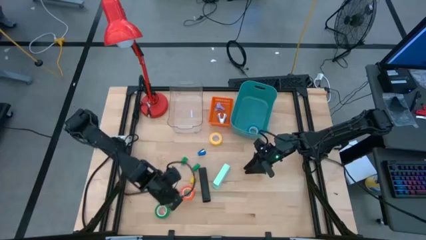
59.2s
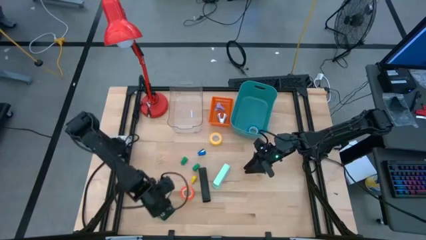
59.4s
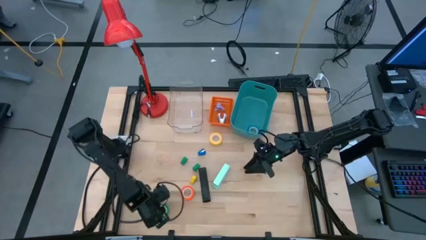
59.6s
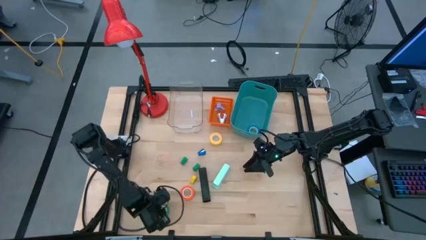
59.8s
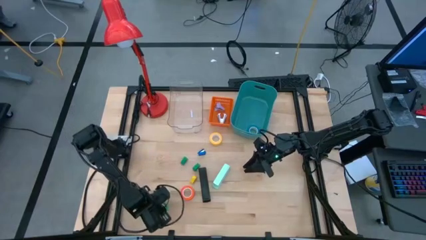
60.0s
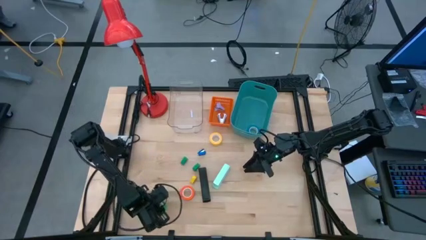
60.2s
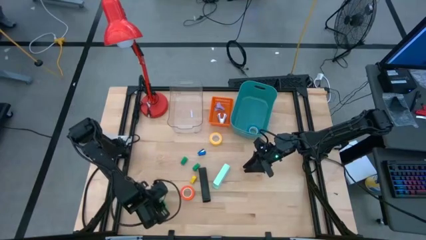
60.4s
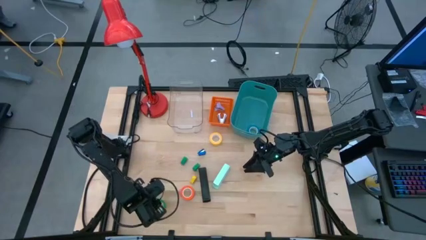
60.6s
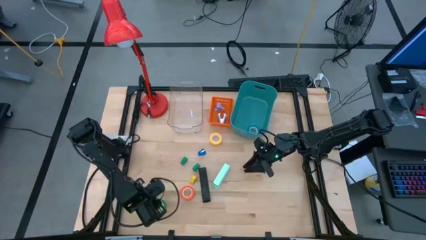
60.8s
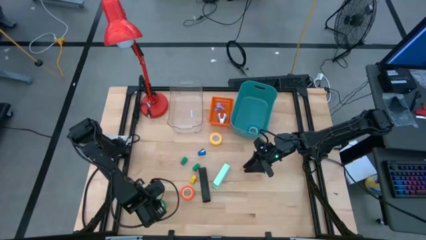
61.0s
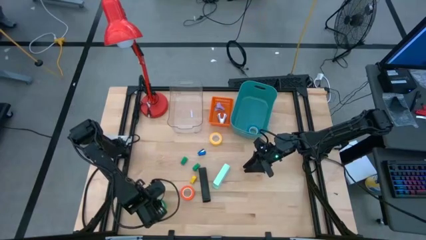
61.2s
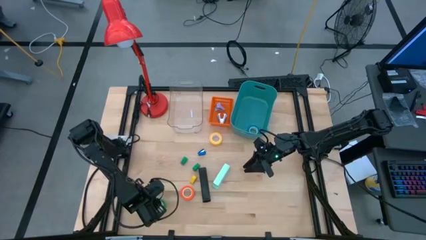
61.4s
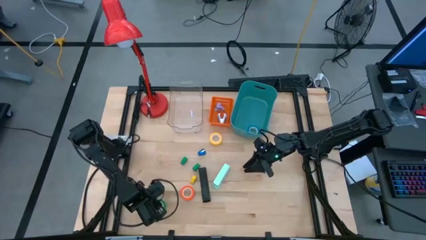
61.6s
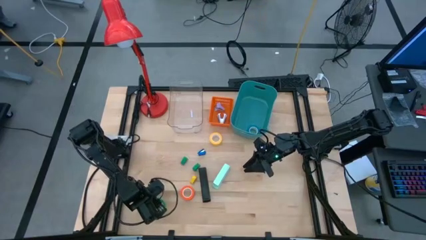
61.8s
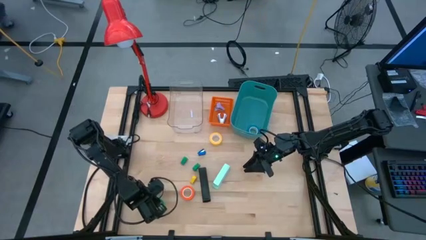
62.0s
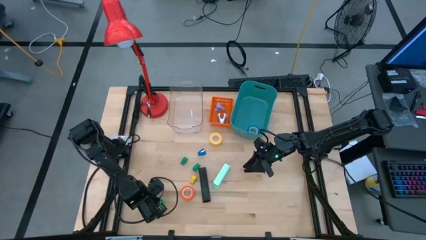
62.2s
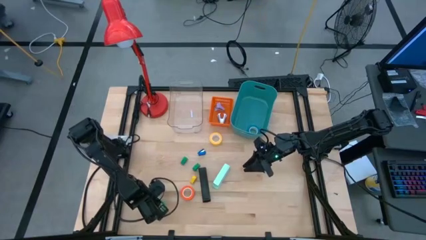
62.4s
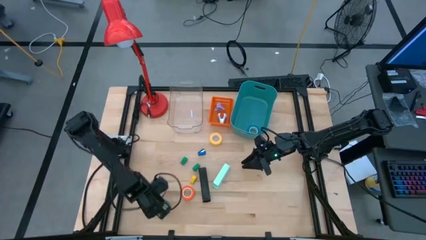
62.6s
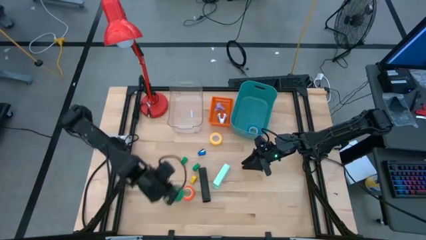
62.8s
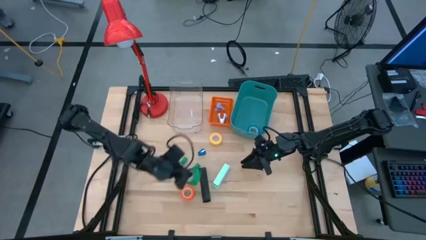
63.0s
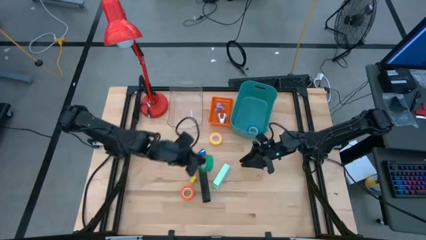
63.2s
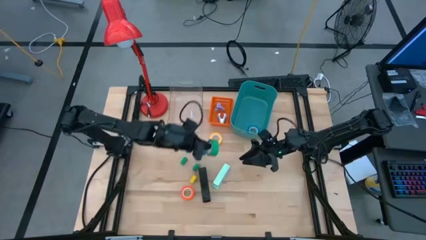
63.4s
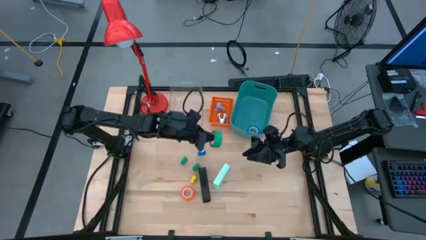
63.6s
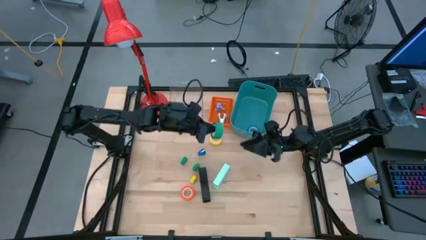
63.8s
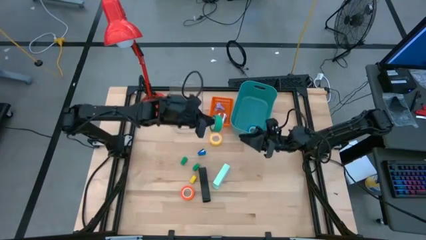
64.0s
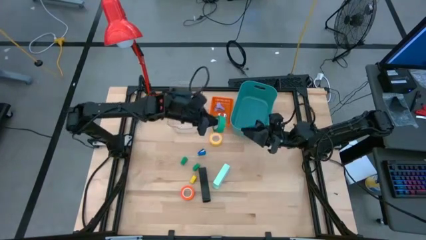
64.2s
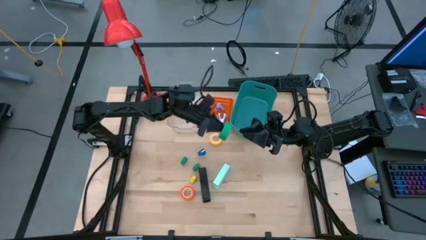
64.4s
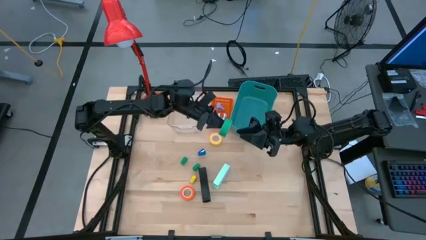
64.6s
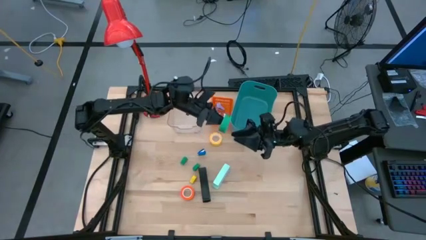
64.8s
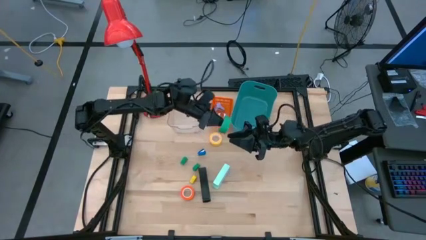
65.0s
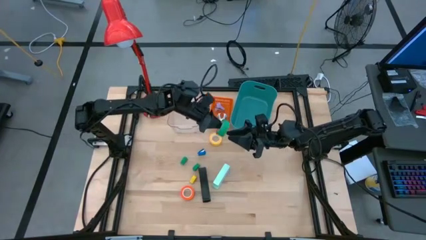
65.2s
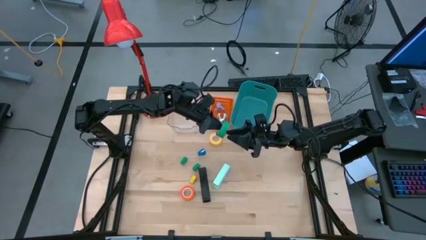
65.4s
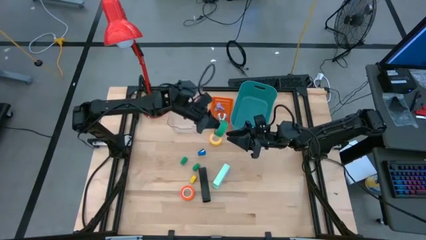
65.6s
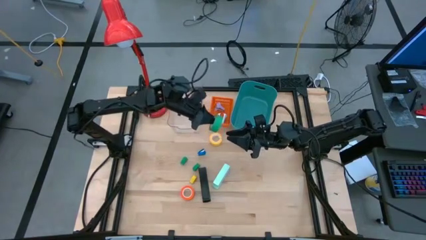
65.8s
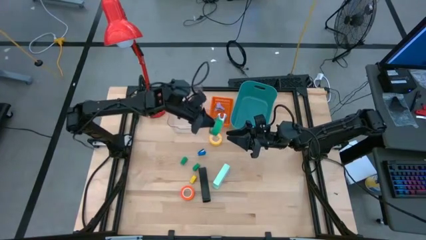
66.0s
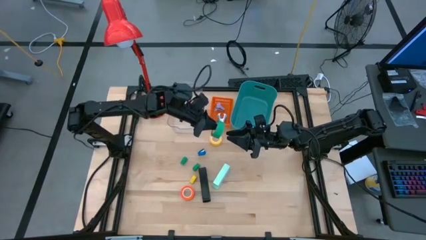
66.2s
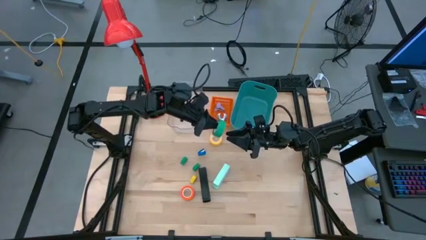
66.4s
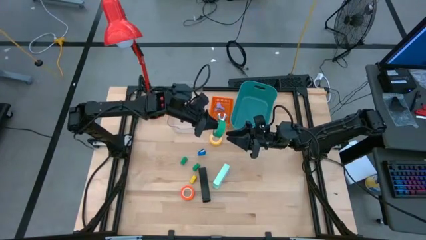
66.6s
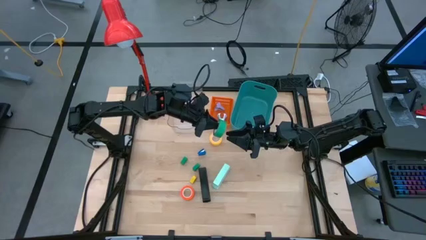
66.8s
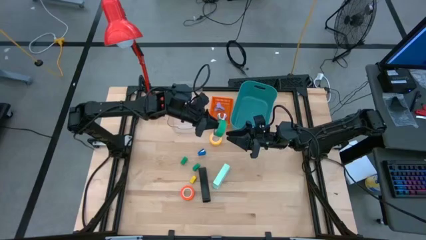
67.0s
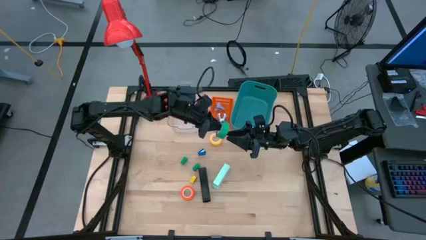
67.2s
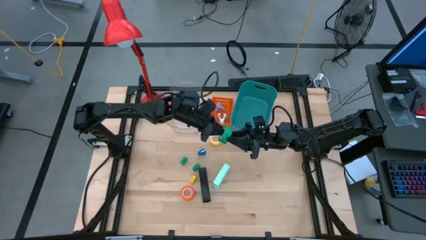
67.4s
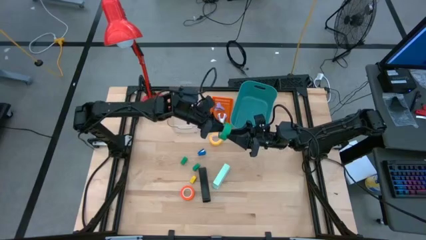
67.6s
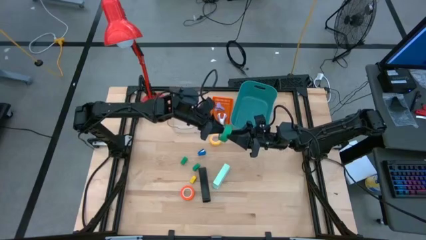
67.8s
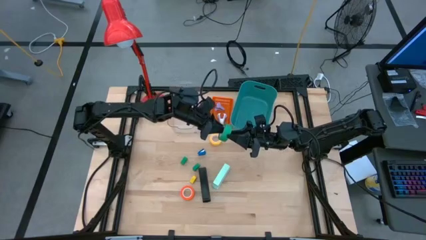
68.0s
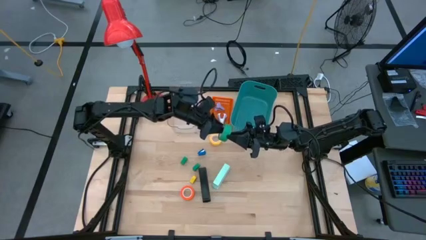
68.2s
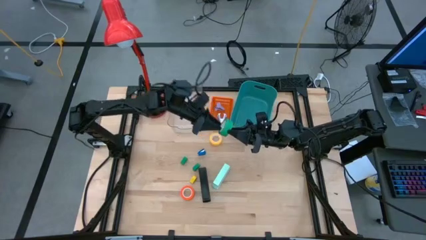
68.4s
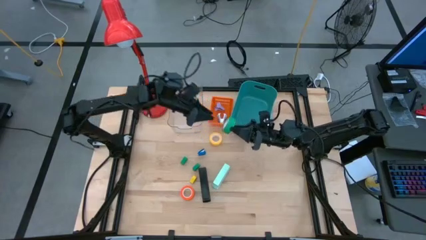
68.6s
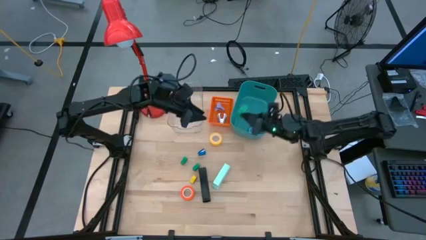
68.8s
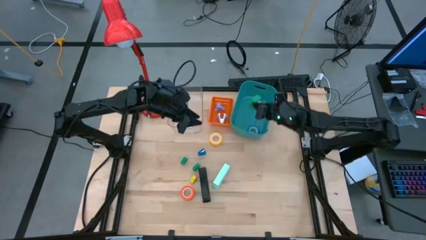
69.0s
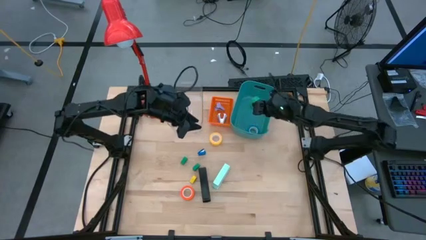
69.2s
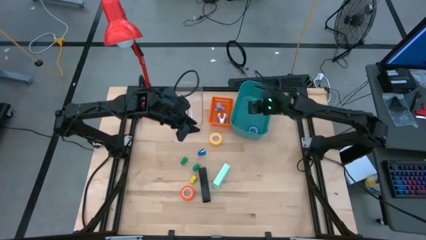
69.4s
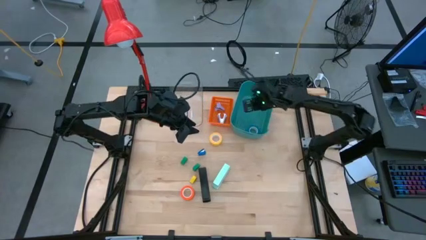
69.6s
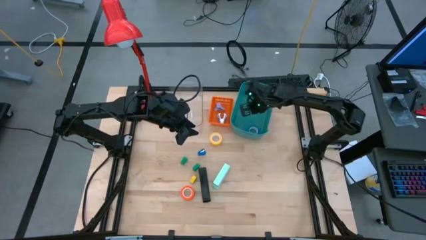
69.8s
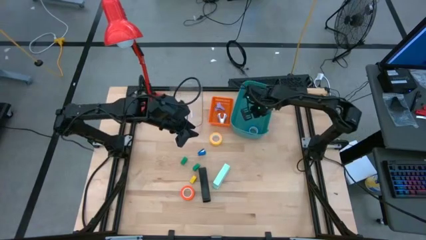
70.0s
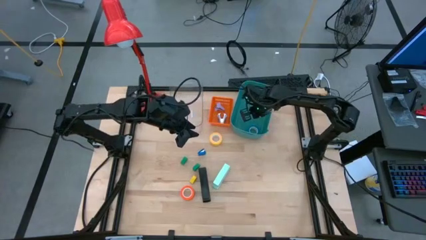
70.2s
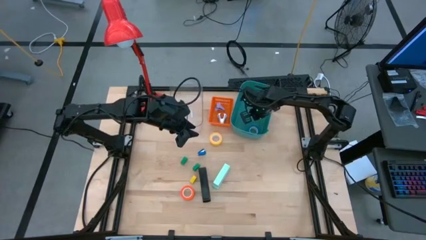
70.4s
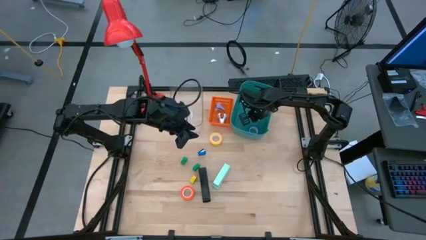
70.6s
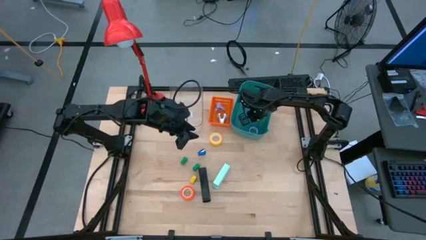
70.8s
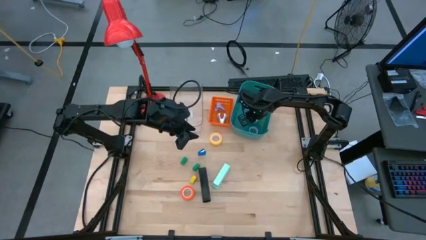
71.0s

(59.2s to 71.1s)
Task: Pick and place Stapler, Stapler remover, tape
Put the green tape into the green bin

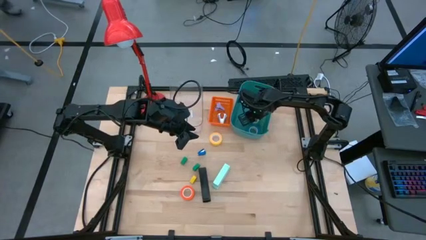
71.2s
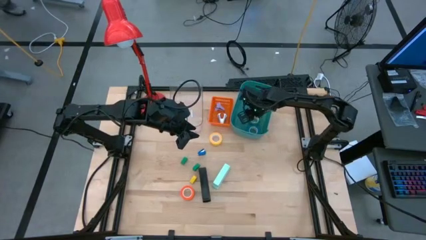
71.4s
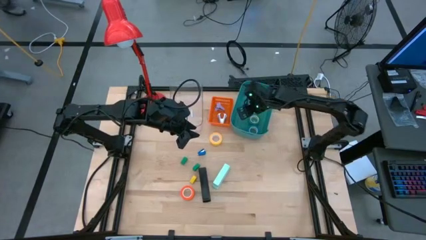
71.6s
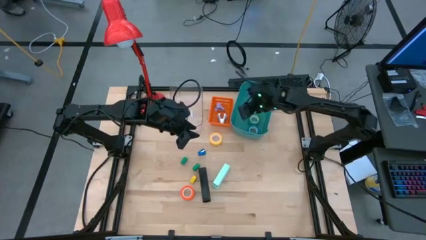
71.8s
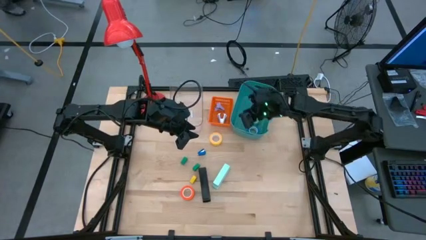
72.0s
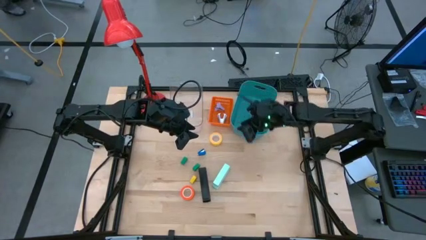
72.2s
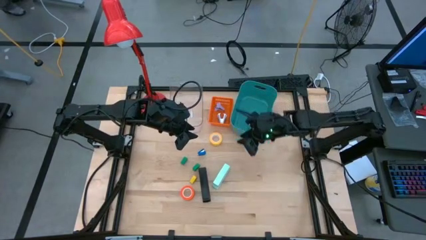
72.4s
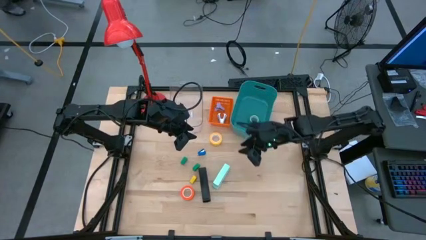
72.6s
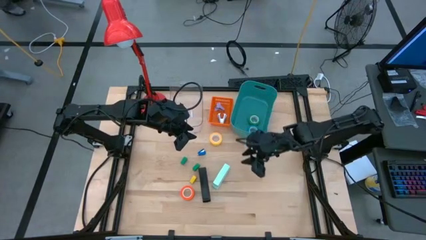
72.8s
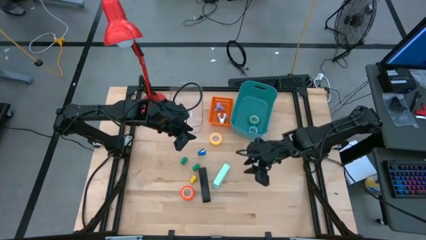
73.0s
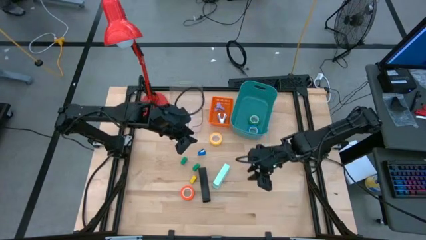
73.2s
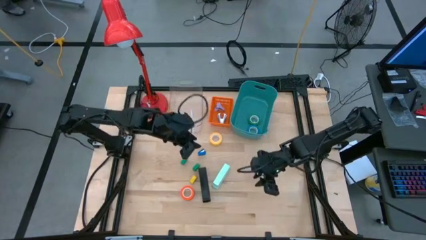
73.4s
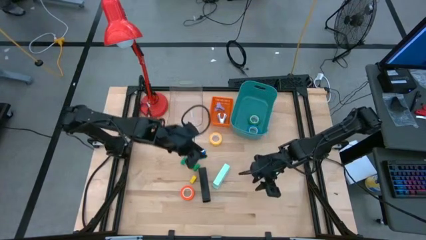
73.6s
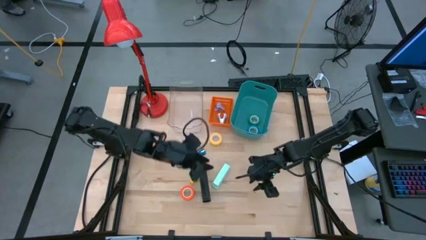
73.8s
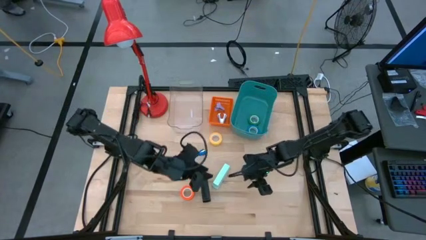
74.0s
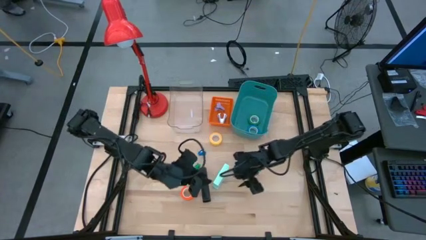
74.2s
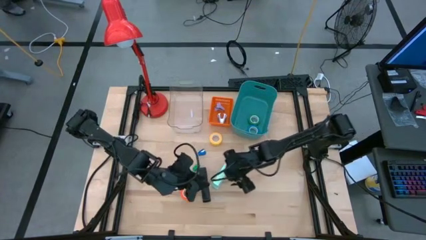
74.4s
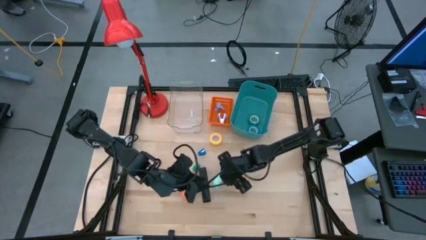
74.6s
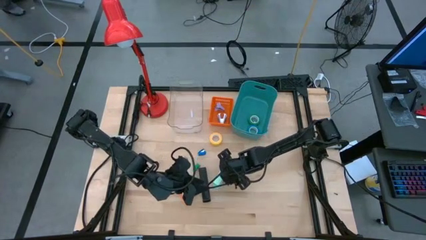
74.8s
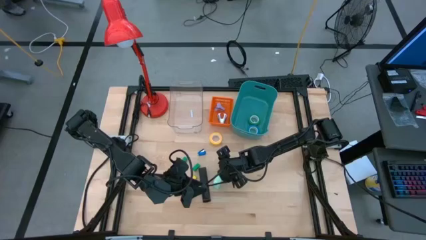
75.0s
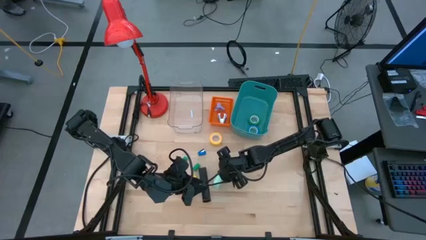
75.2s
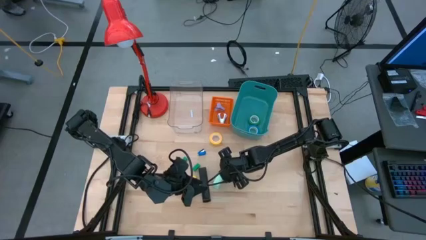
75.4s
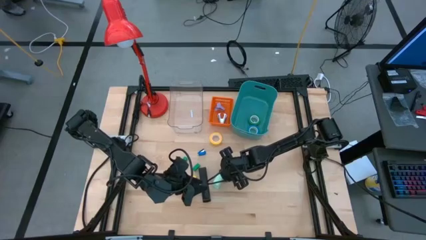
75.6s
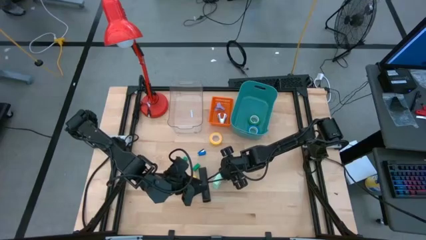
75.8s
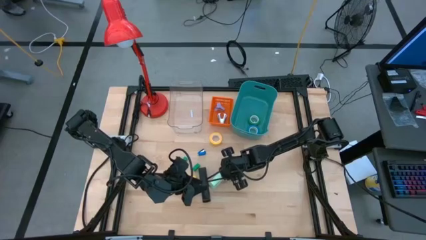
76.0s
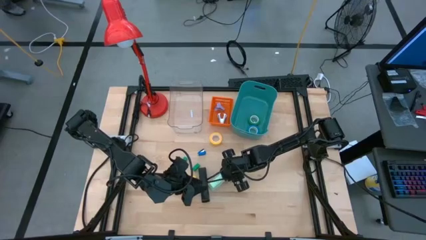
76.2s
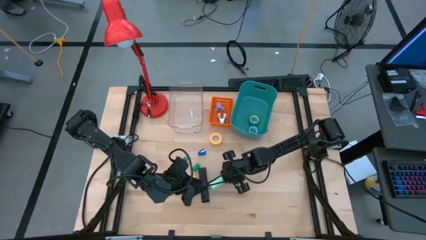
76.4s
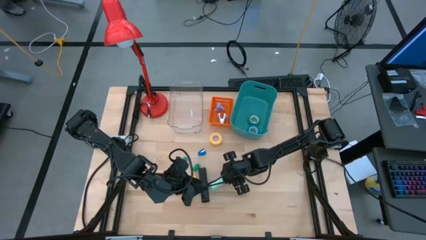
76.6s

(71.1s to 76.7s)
Put the light blue stapler into the transparent bin
